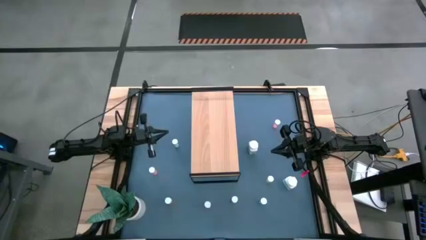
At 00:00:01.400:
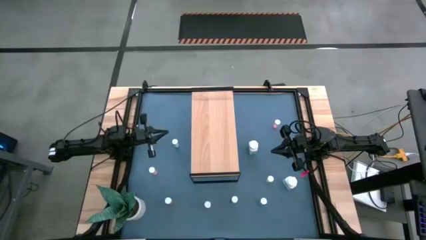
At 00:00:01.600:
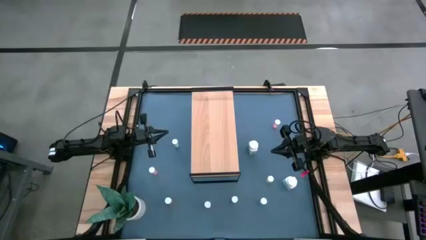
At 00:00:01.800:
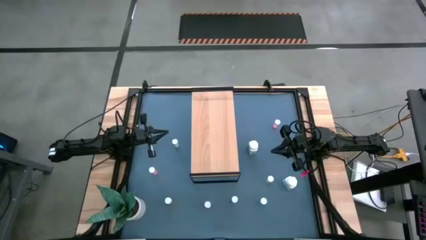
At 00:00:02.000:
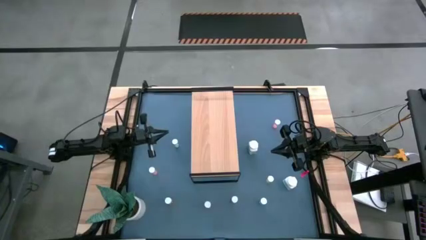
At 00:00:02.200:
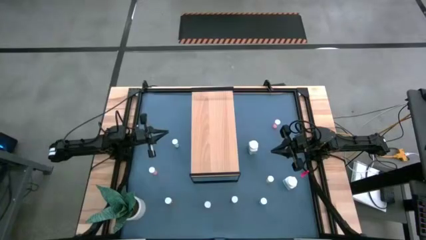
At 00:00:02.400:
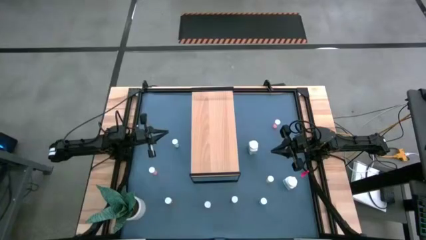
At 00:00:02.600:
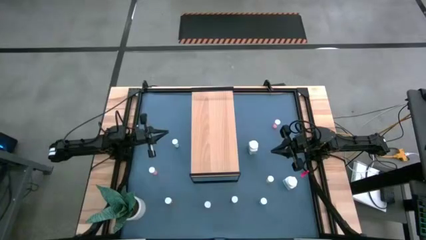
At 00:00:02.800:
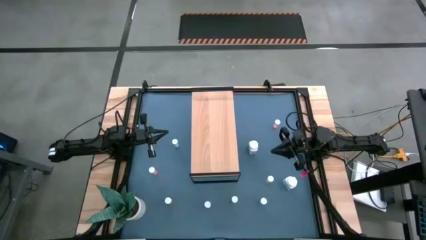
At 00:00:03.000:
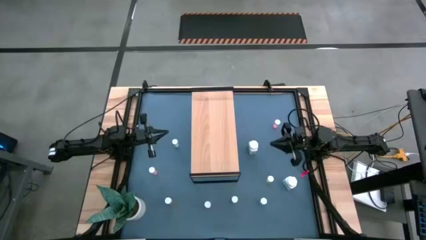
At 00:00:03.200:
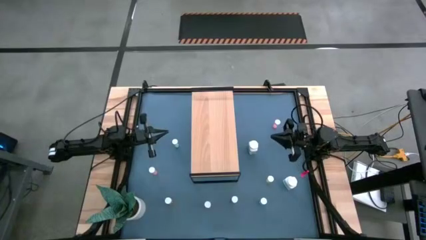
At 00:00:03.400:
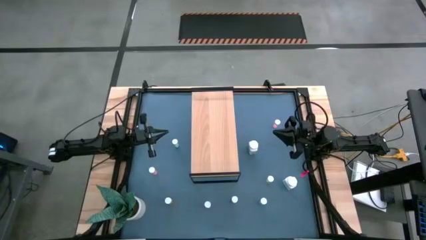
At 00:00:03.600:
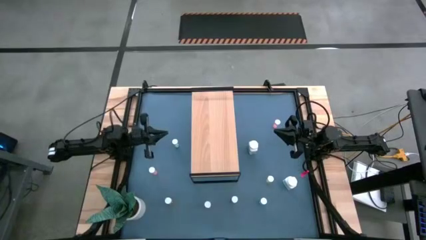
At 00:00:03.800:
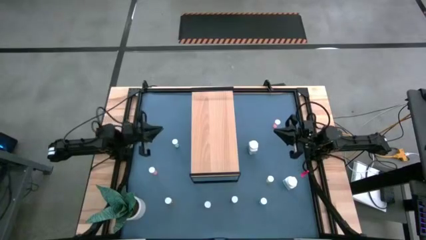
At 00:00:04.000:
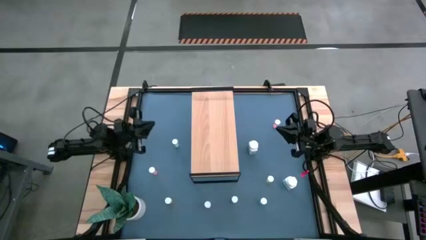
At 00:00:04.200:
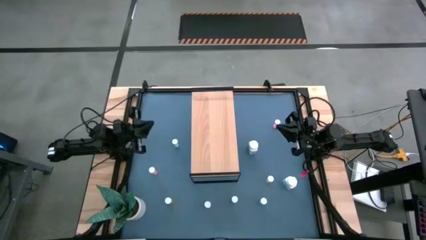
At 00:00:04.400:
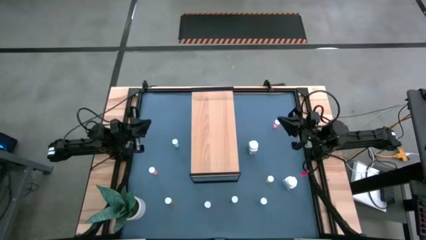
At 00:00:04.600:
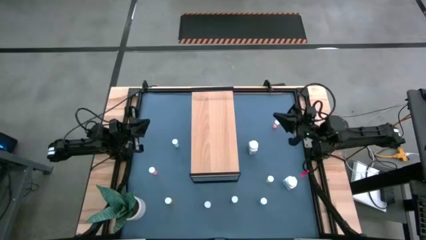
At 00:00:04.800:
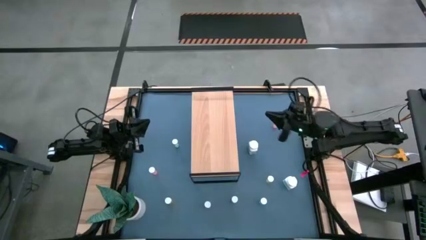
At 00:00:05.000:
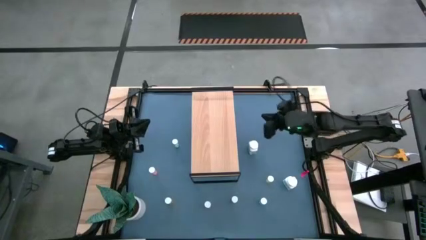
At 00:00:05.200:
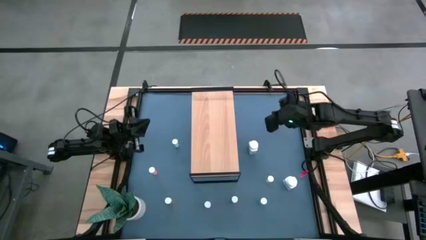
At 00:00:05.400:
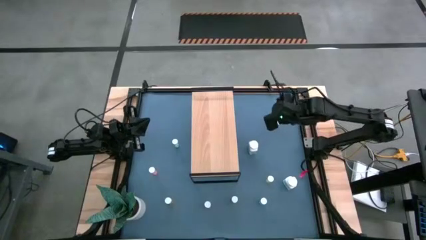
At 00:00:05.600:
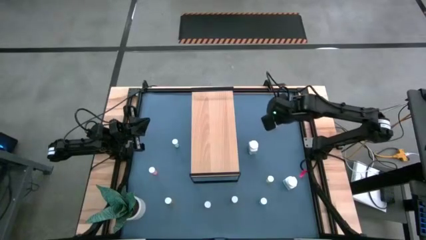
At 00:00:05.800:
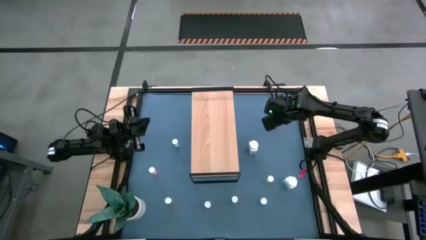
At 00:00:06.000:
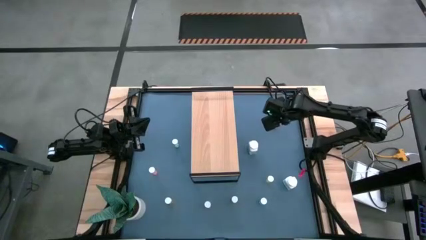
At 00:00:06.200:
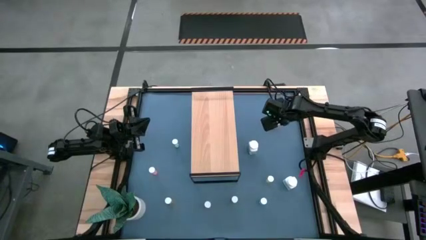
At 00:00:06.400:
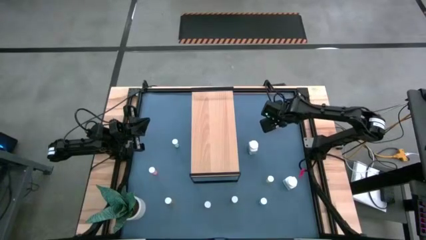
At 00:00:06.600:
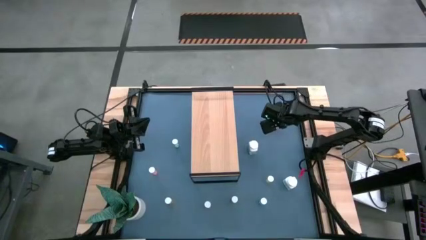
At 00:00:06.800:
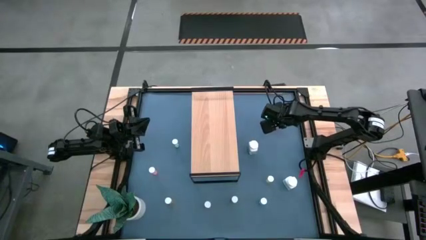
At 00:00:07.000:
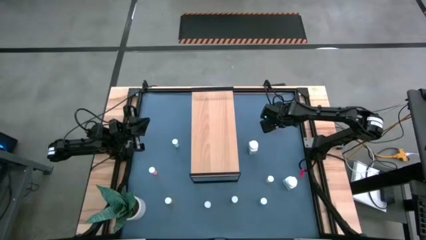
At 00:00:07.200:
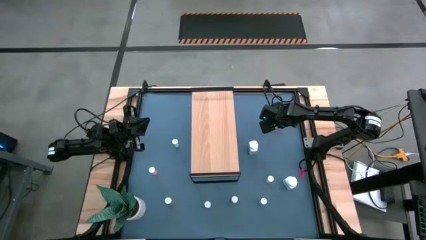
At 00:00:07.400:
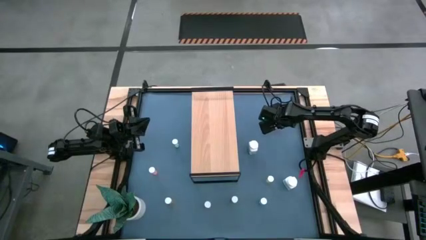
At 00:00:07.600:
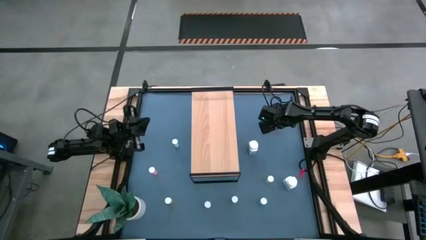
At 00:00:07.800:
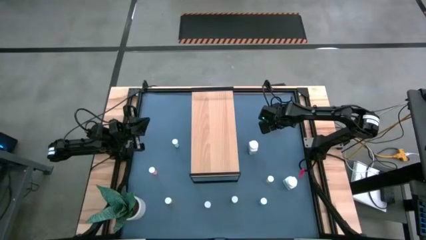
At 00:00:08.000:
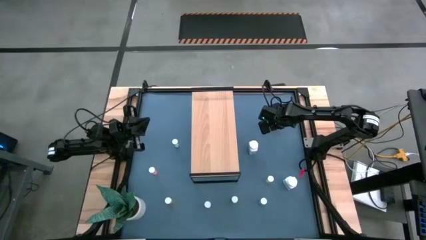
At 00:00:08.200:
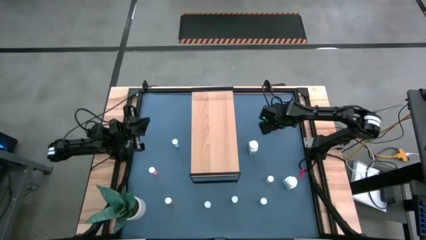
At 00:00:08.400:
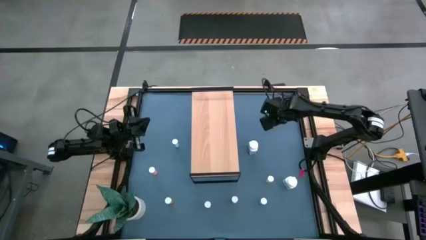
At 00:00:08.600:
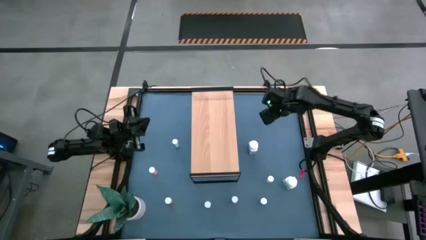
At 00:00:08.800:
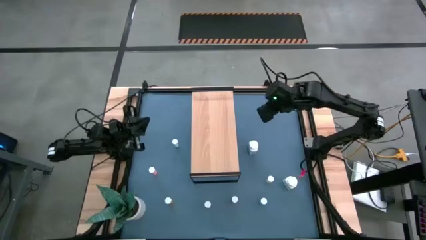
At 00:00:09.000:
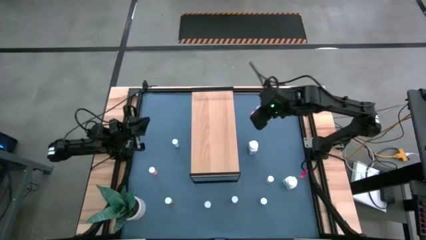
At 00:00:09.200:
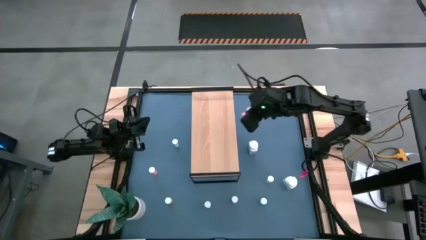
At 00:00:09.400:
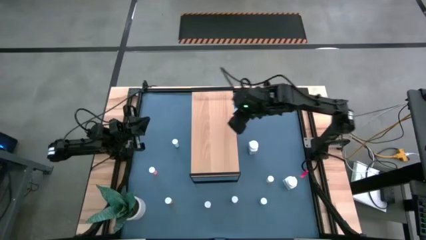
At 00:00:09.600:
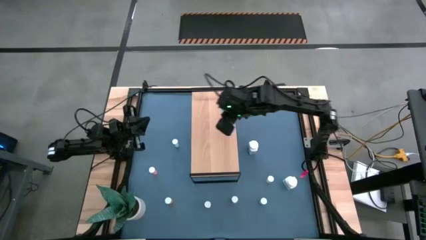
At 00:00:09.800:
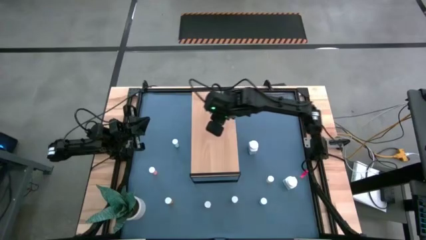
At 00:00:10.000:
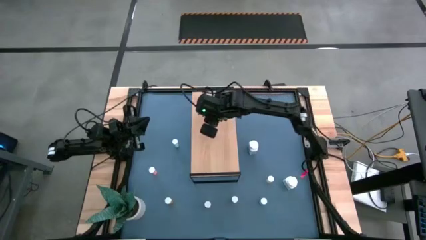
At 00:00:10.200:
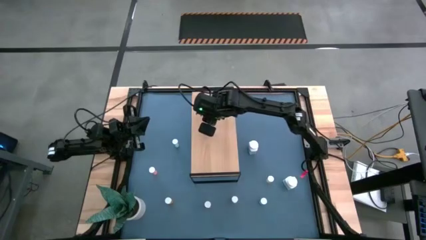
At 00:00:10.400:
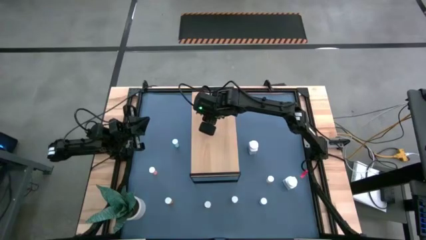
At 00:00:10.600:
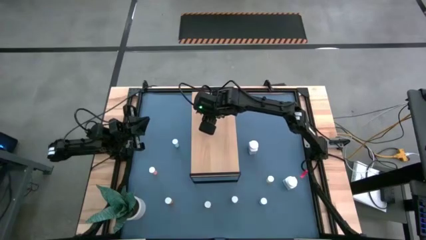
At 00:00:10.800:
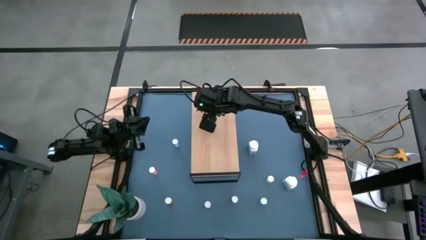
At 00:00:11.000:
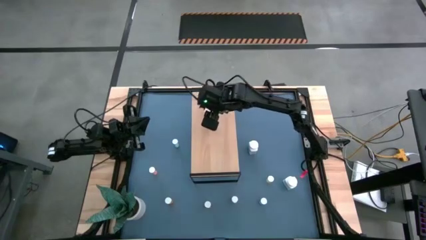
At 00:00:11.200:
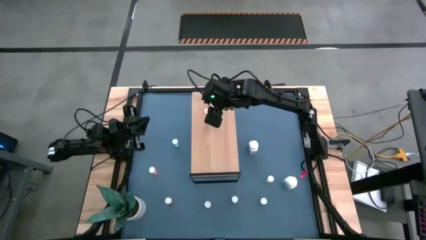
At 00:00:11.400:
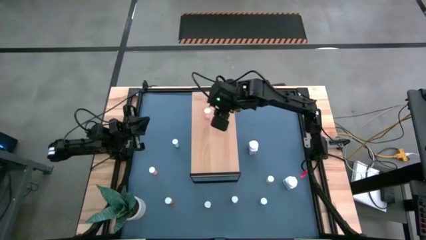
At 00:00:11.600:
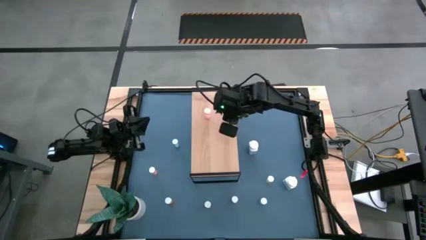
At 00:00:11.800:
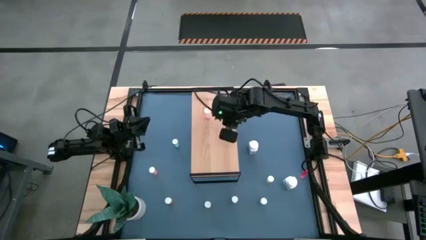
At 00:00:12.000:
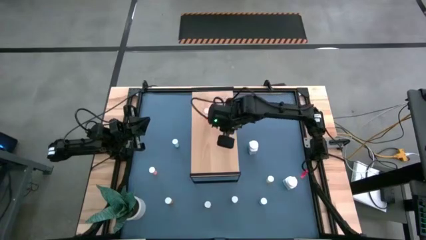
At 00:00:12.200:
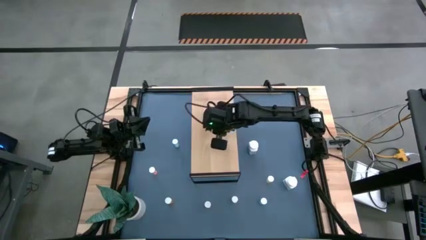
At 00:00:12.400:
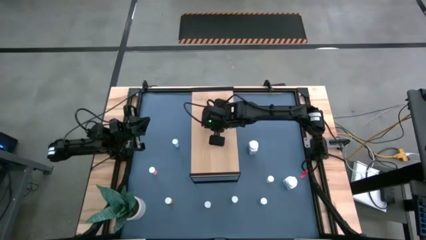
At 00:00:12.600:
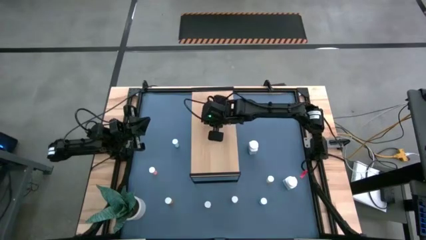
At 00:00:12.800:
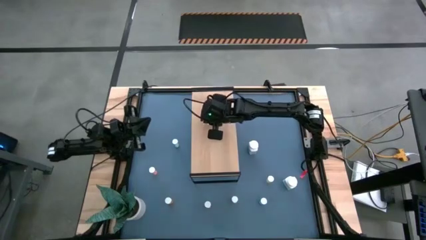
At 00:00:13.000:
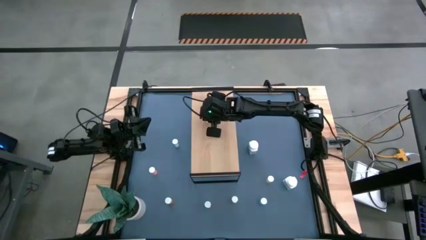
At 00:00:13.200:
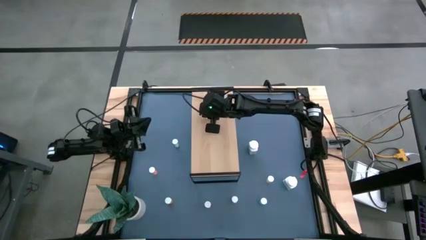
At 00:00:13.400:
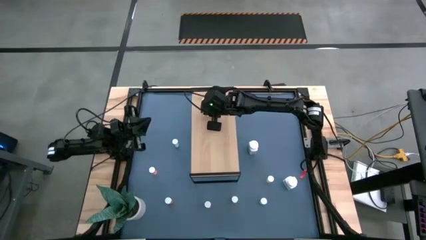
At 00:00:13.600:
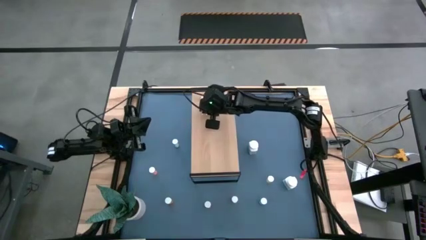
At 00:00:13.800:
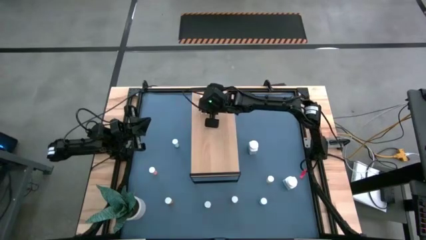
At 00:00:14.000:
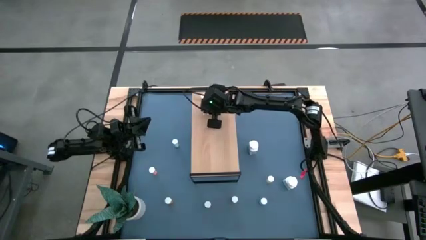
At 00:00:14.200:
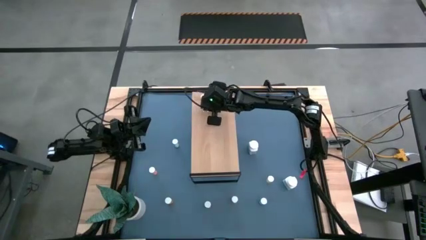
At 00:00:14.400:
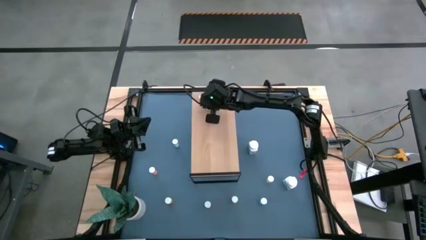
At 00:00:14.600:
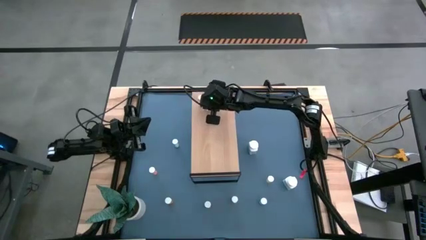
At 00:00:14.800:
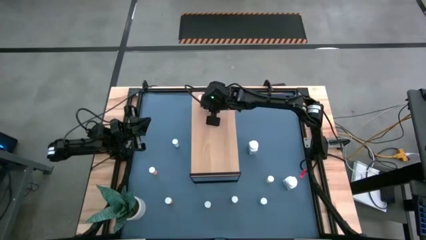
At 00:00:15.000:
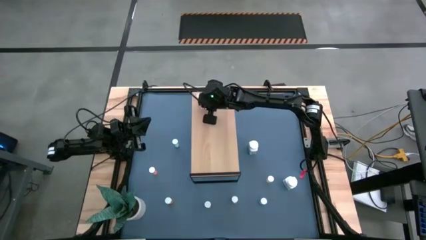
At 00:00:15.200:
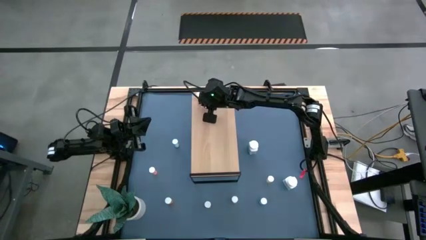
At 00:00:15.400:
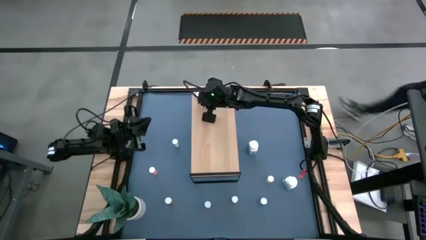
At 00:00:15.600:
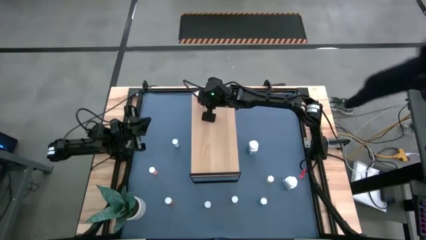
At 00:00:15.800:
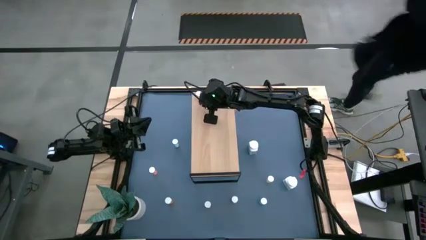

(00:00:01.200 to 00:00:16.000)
Task: Pick and place medicine bottles onto shelf by color
Put the pink pill bottle on the shelf
